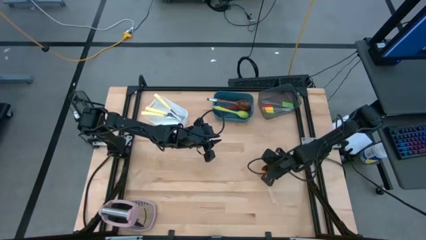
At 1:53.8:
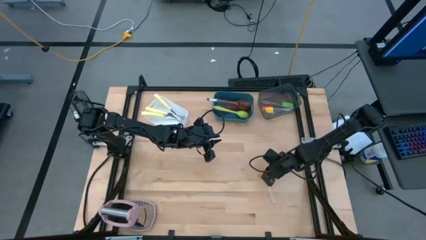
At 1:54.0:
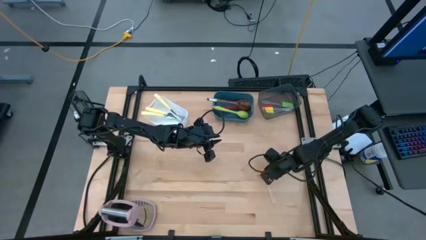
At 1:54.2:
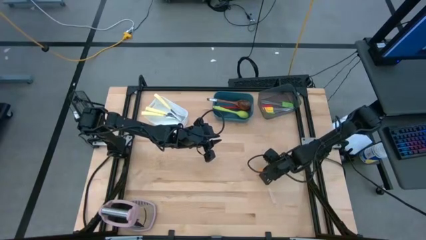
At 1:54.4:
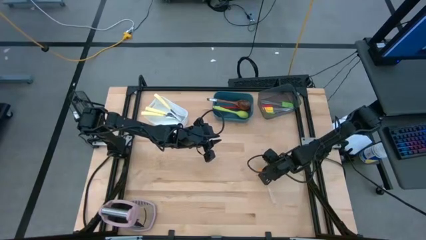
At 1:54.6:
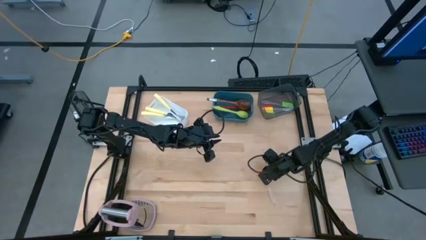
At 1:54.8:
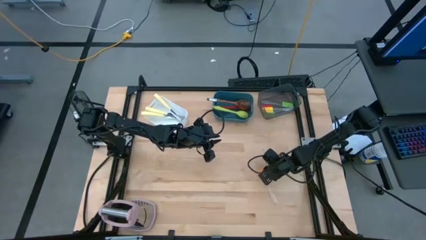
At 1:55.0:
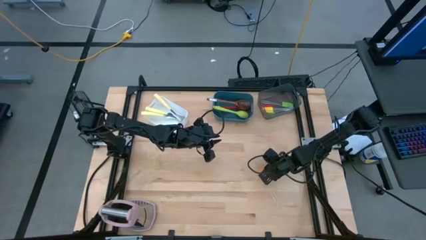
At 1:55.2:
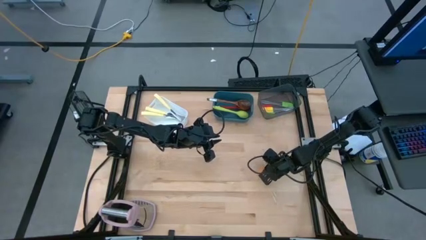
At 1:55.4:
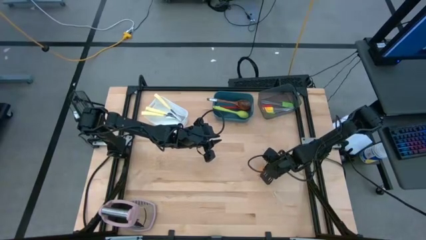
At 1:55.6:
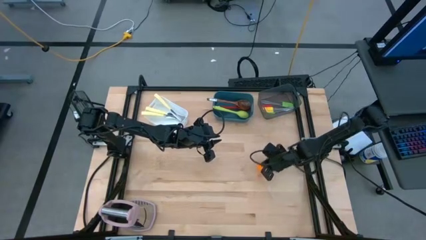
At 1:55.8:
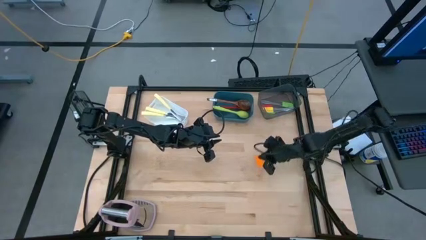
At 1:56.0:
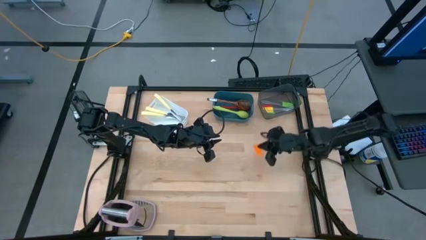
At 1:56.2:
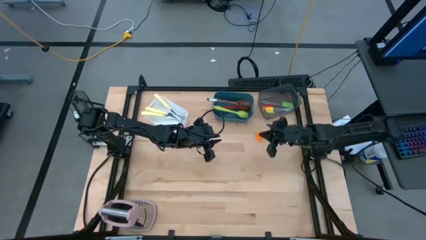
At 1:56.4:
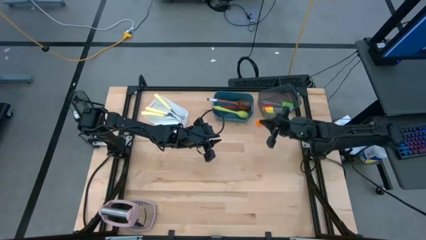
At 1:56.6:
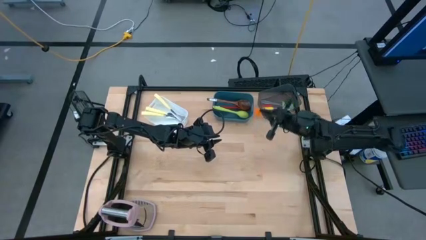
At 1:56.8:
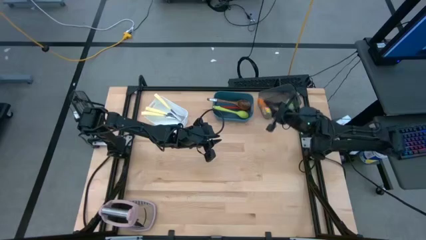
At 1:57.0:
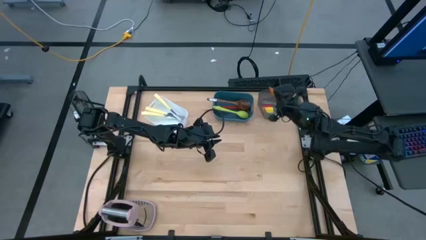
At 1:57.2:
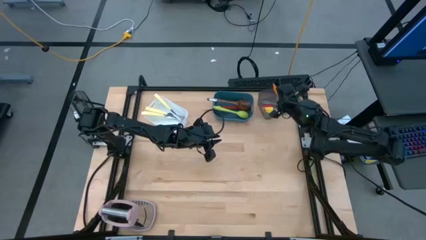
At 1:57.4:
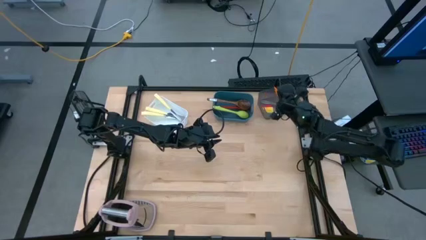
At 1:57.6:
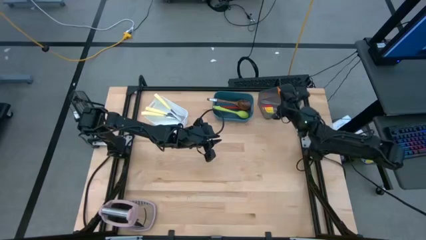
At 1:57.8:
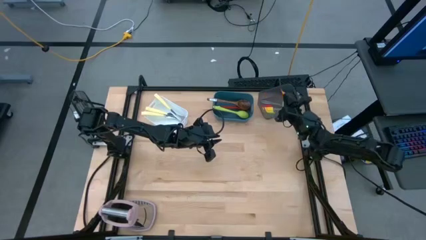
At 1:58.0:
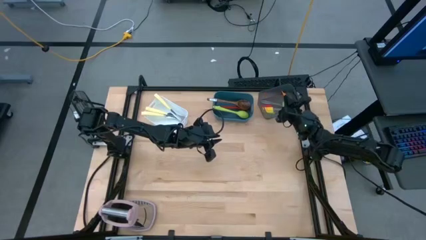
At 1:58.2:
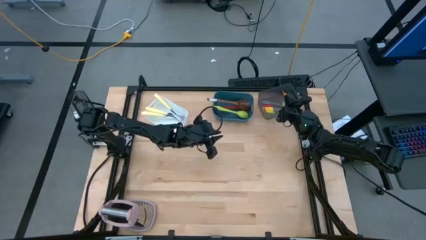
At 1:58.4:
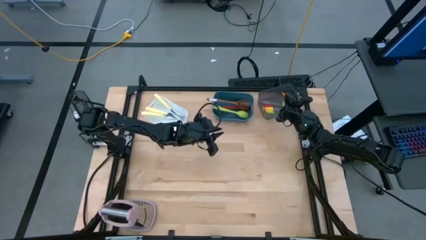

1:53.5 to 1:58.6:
Task: Pick & Place Kitchen Items
Put the orange spatula into the black bin

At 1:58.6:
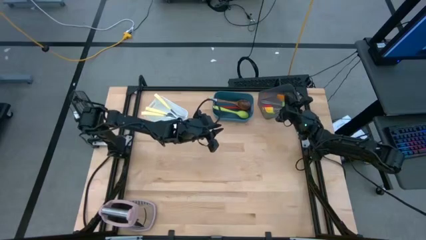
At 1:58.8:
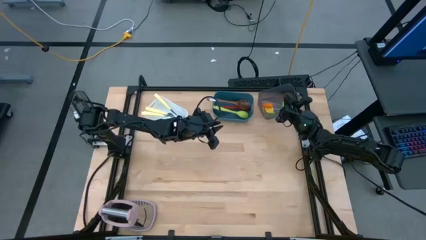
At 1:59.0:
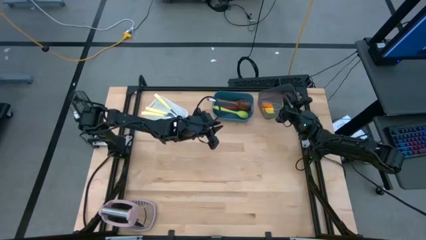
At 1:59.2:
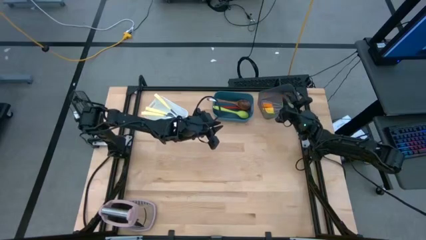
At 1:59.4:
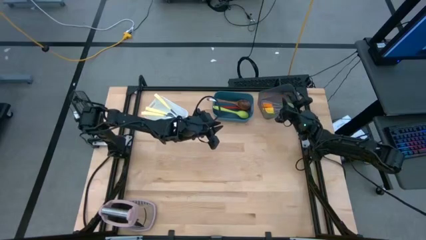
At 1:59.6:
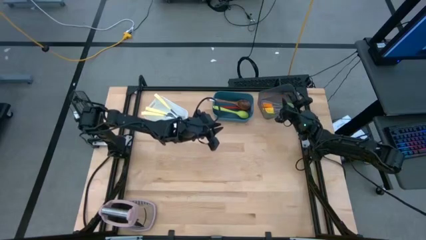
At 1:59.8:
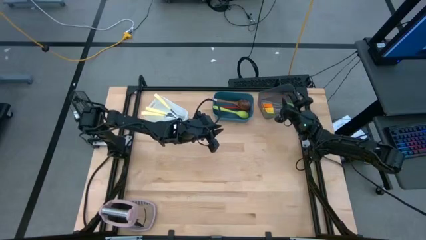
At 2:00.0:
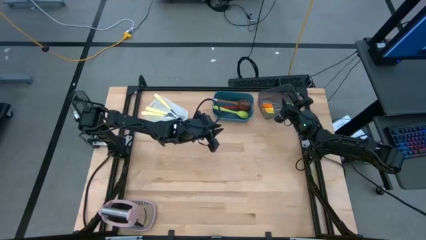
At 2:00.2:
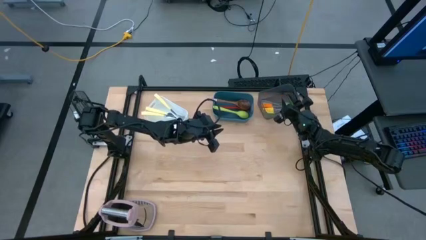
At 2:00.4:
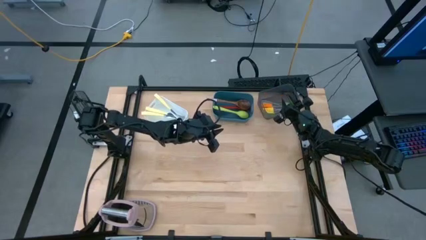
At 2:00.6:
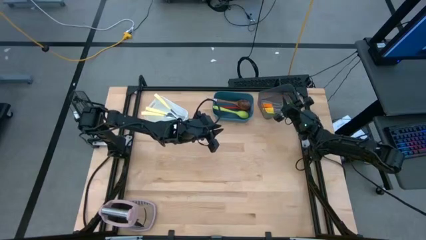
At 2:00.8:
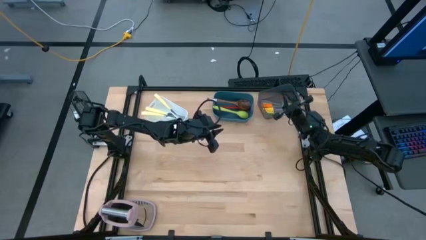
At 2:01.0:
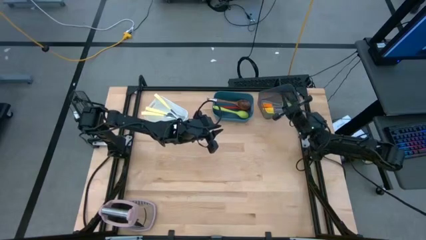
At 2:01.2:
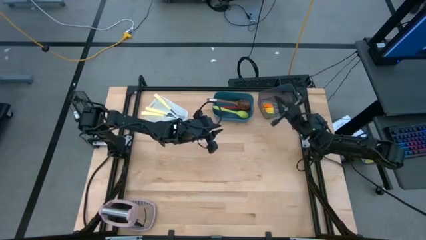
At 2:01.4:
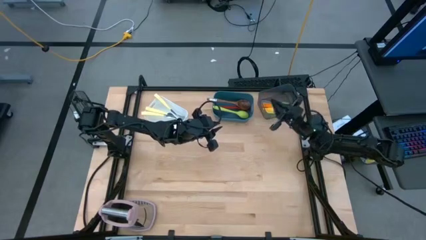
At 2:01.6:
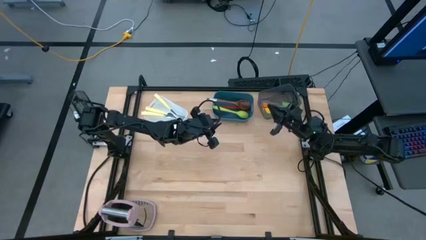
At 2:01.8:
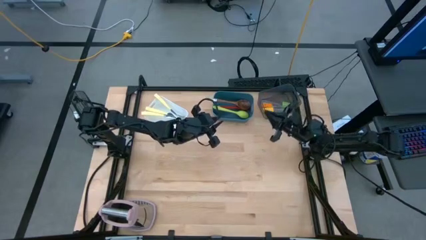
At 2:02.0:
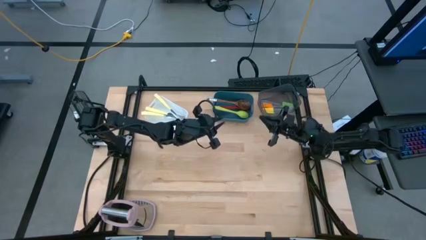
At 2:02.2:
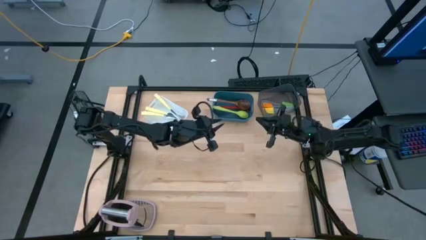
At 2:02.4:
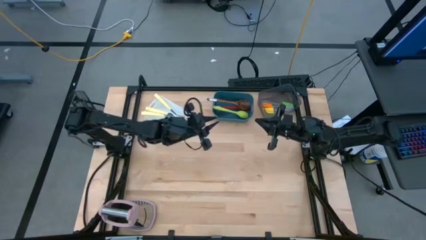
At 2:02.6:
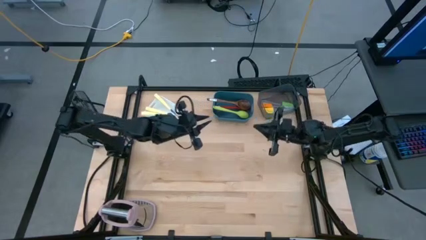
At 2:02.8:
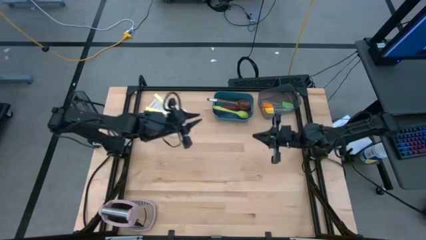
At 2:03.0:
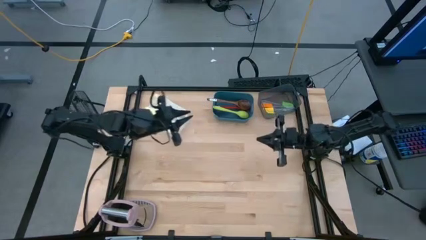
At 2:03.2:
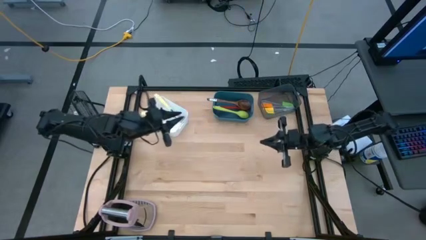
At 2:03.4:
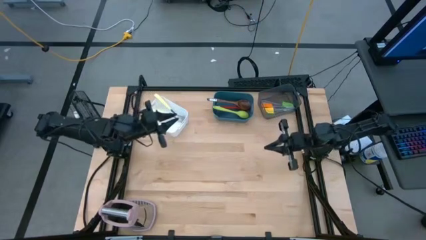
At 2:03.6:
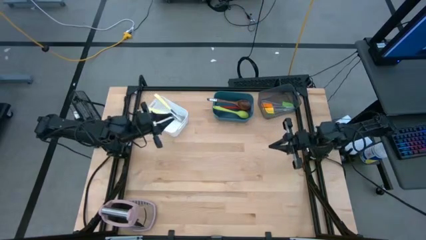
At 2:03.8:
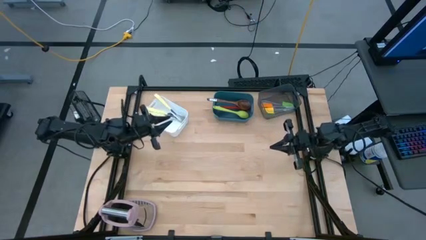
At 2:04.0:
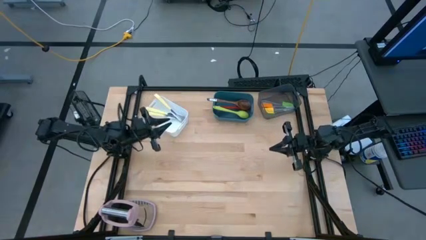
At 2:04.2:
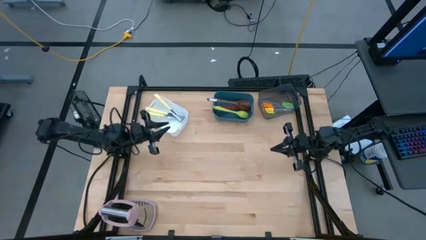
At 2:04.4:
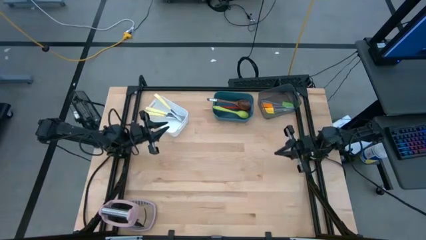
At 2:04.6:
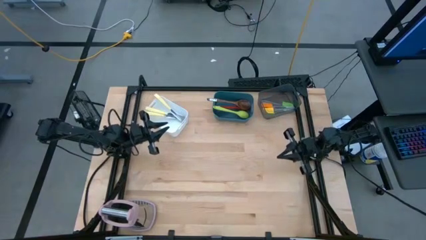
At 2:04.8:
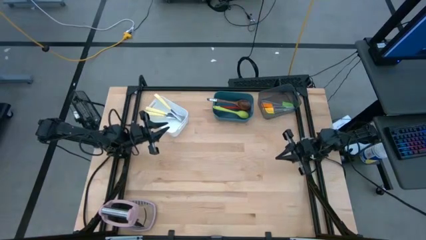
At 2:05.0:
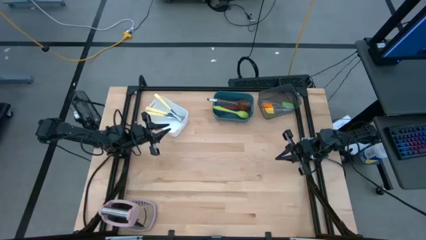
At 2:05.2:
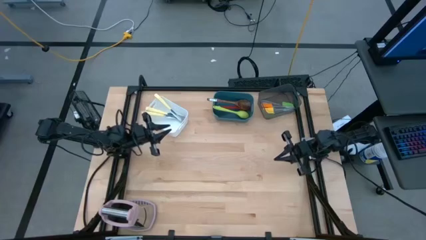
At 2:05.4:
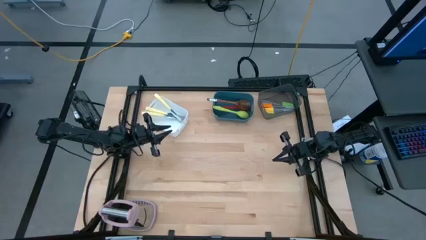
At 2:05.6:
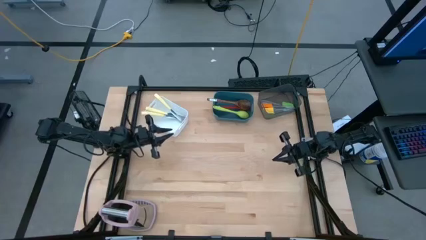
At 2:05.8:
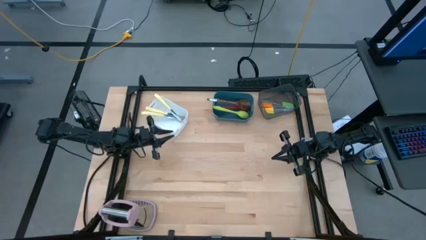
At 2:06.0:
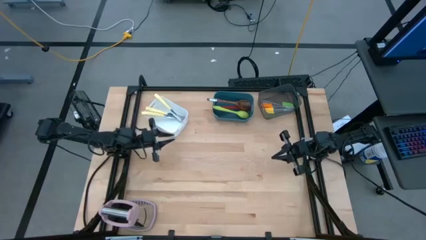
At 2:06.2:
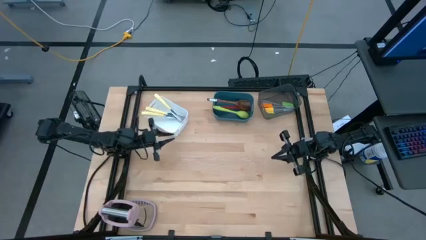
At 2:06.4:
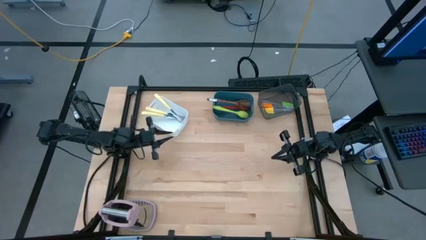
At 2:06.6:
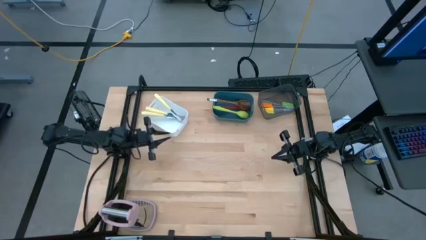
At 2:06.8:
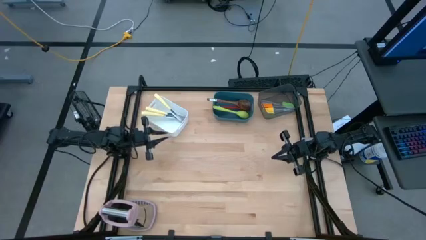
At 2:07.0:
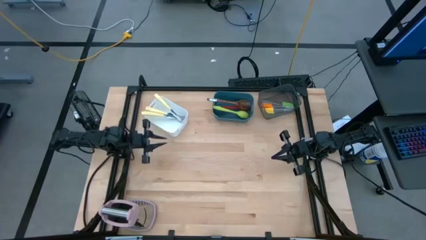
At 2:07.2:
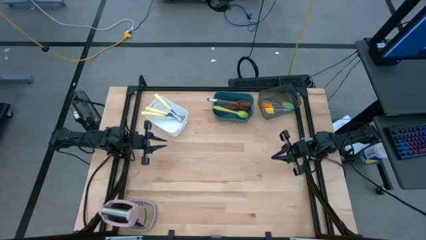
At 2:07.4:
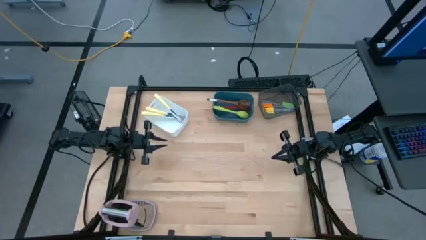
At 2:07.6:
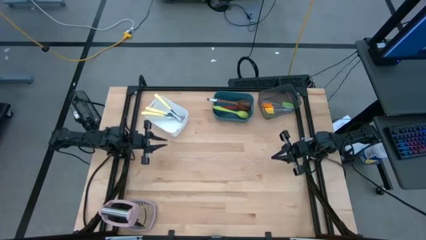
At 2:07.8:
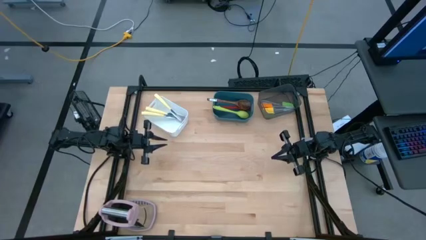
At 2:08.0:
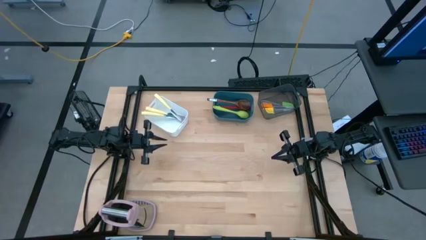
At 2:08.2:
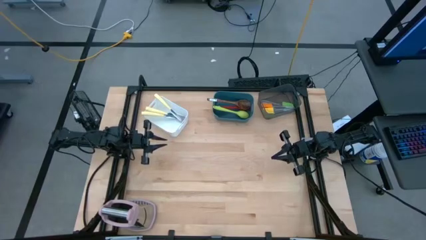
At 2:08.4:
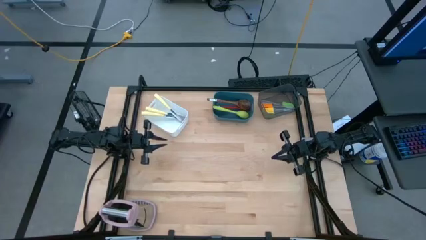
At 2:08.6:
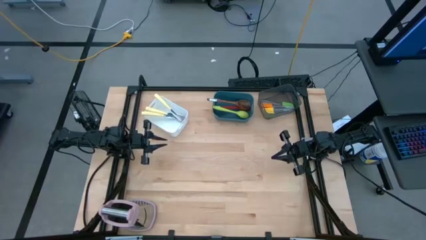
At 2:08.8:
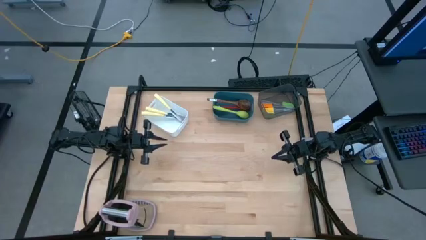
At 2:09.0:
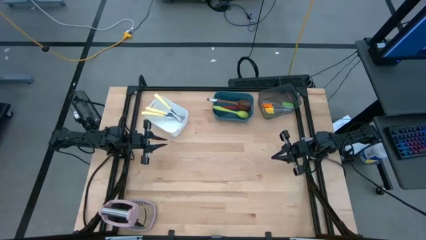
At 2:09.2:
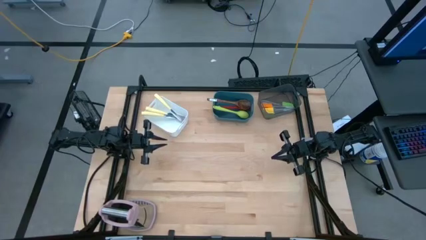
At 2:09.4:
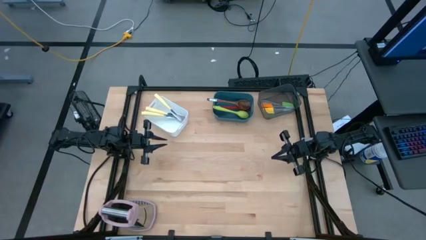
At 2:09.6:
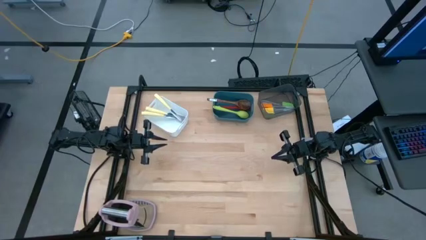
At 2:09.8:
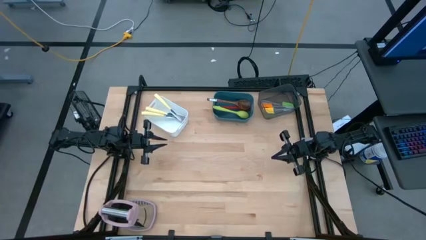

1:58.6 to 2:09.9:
Return to Home Position
